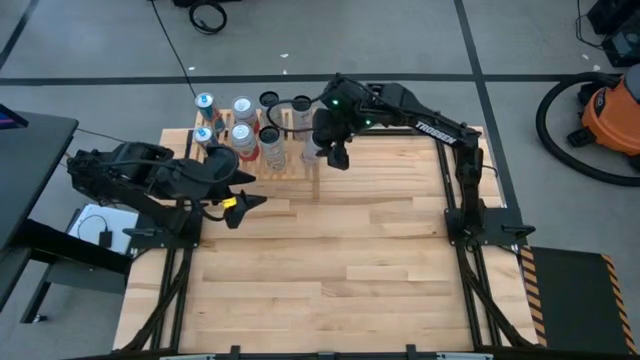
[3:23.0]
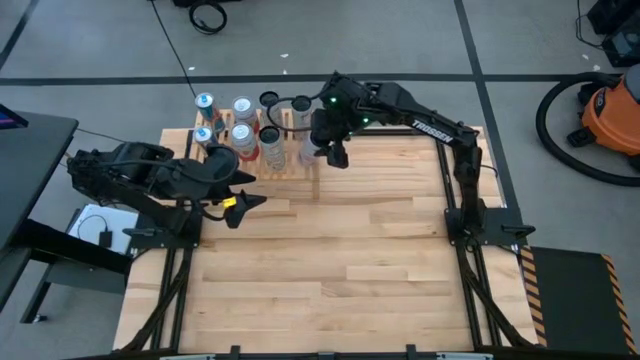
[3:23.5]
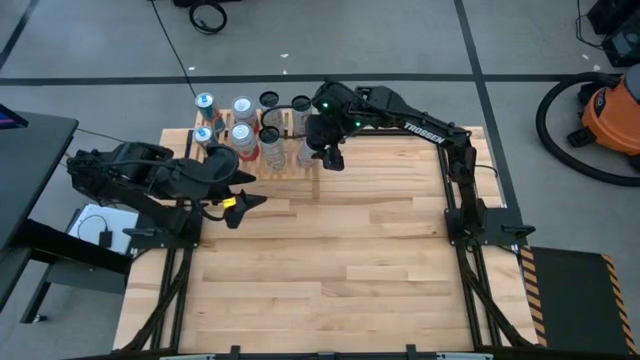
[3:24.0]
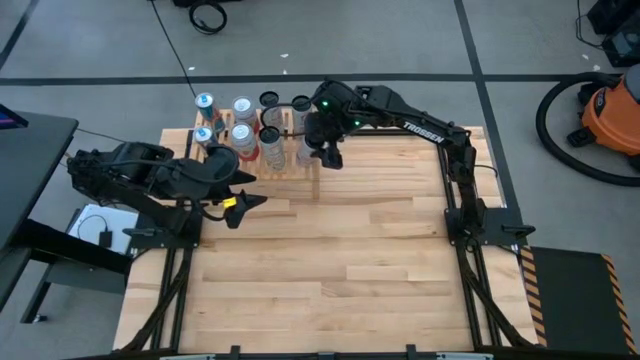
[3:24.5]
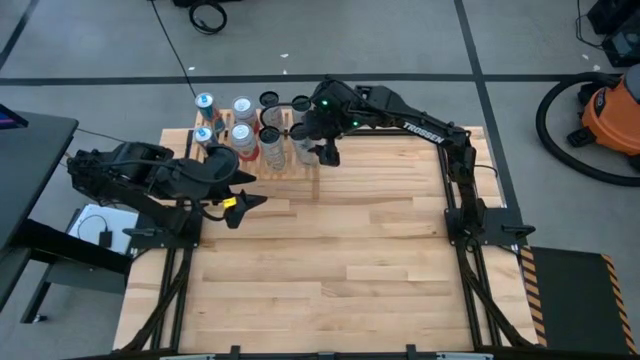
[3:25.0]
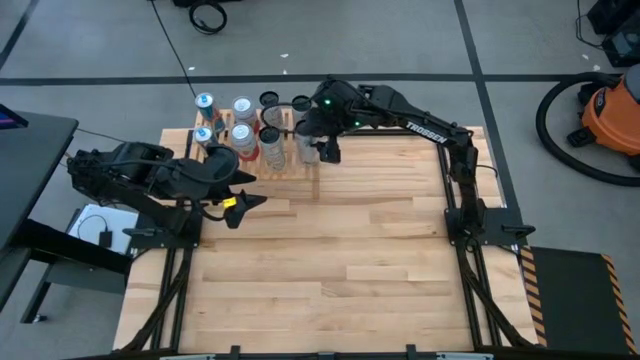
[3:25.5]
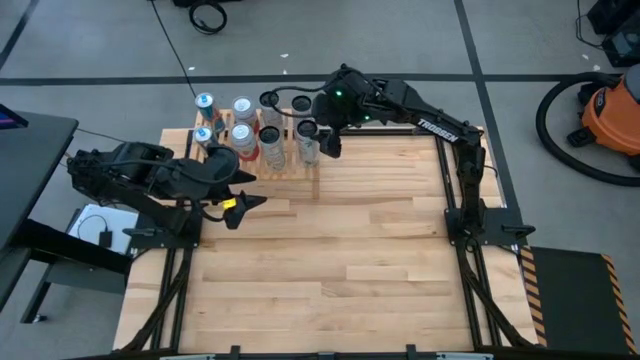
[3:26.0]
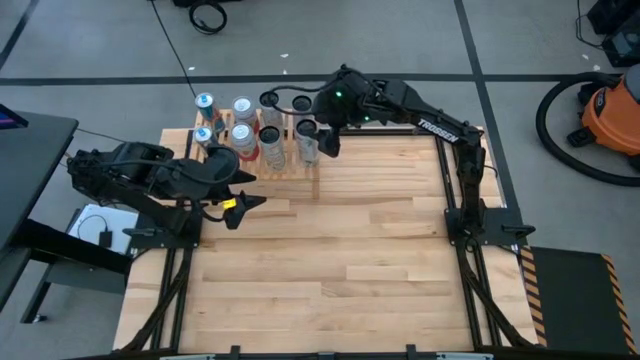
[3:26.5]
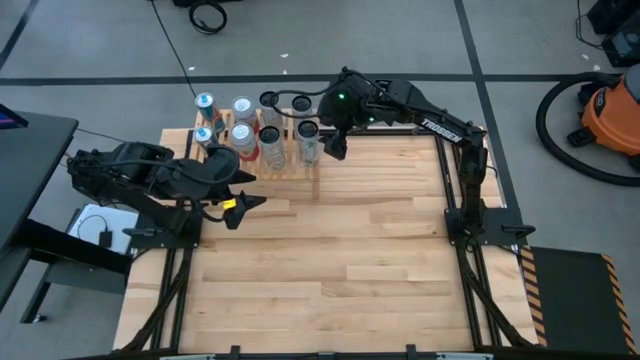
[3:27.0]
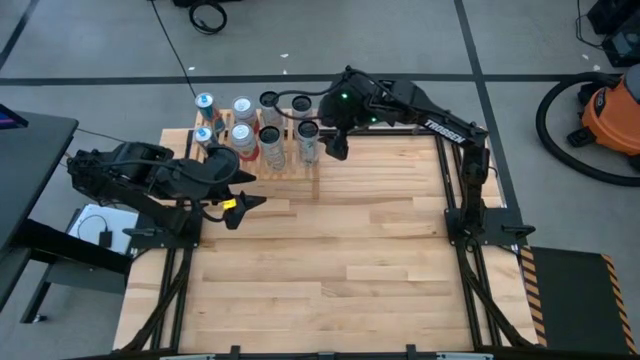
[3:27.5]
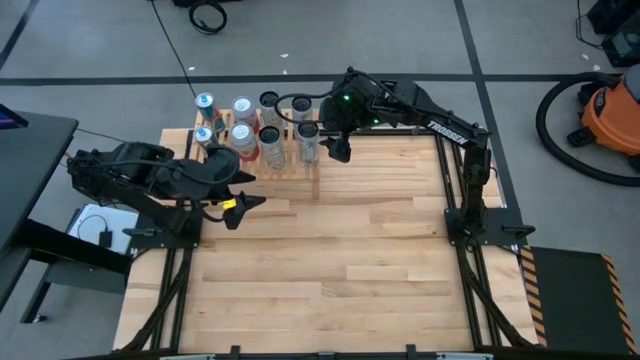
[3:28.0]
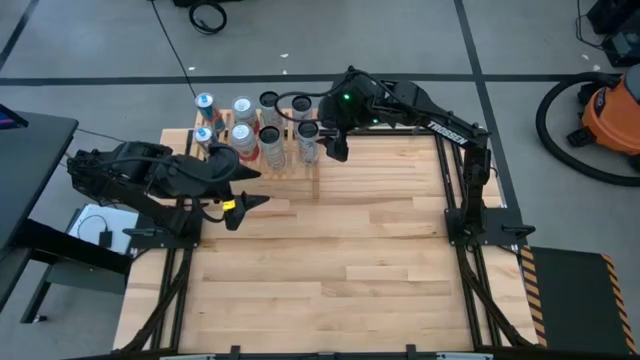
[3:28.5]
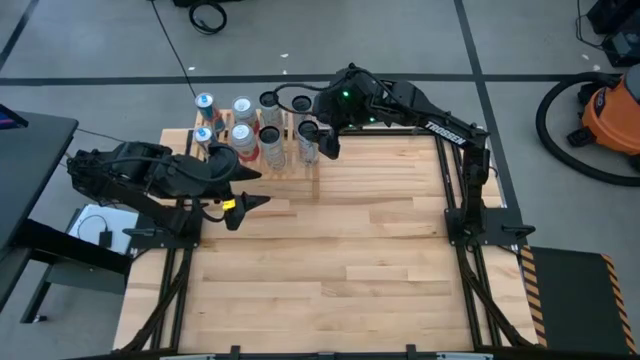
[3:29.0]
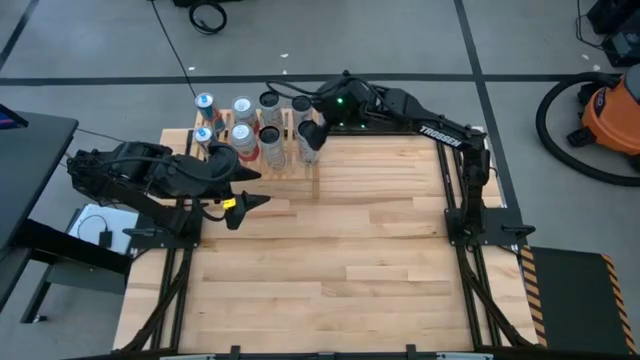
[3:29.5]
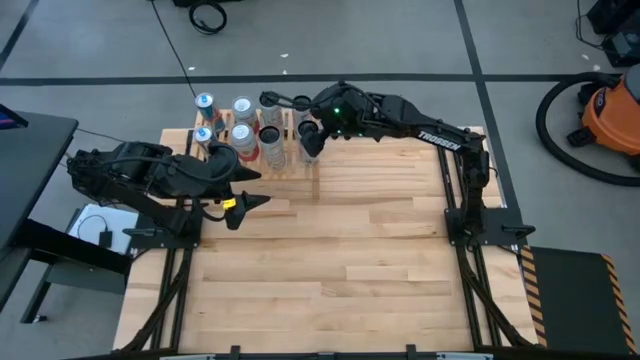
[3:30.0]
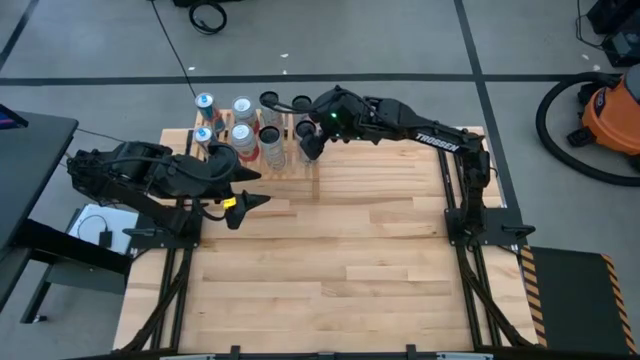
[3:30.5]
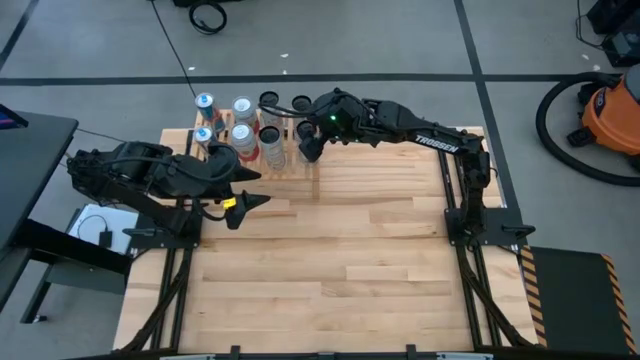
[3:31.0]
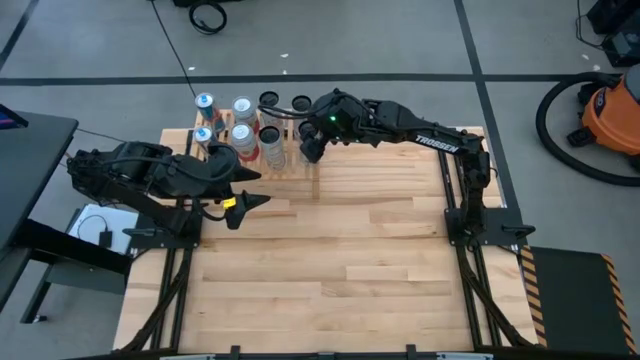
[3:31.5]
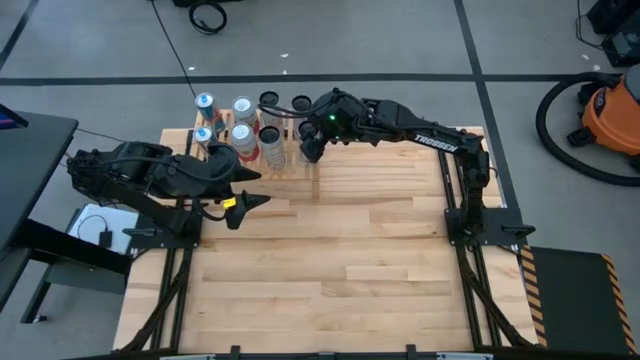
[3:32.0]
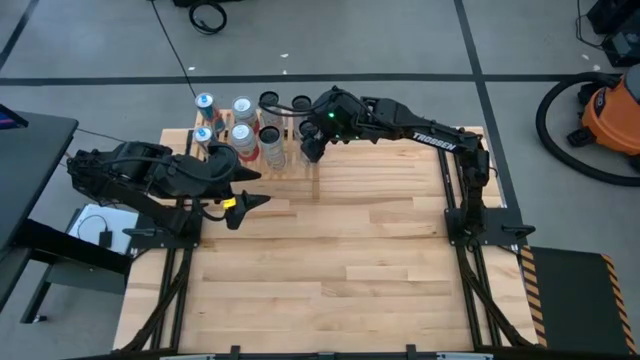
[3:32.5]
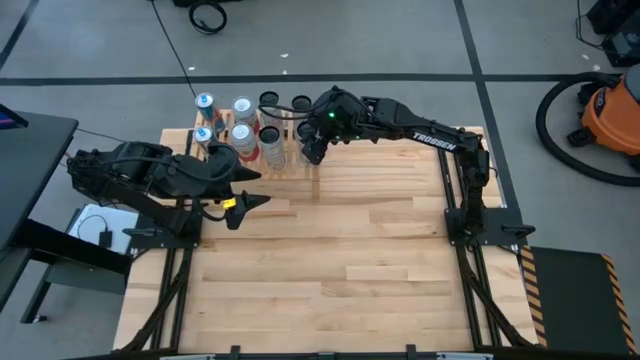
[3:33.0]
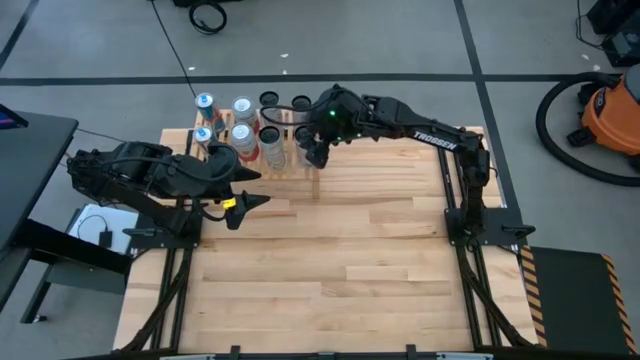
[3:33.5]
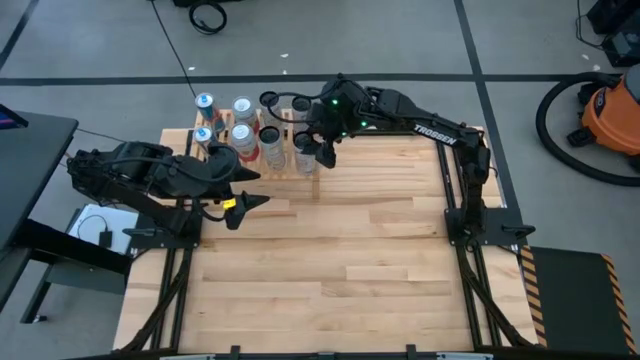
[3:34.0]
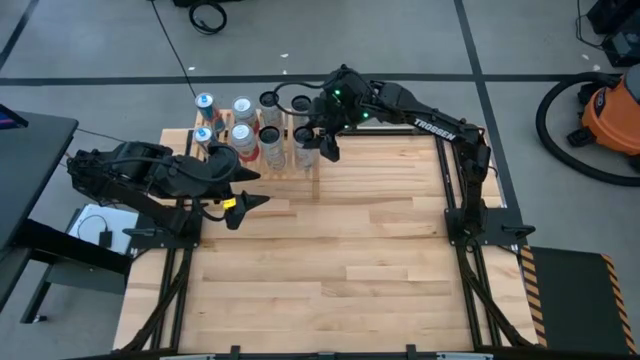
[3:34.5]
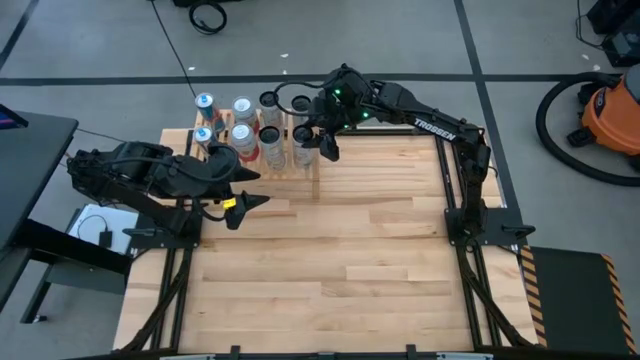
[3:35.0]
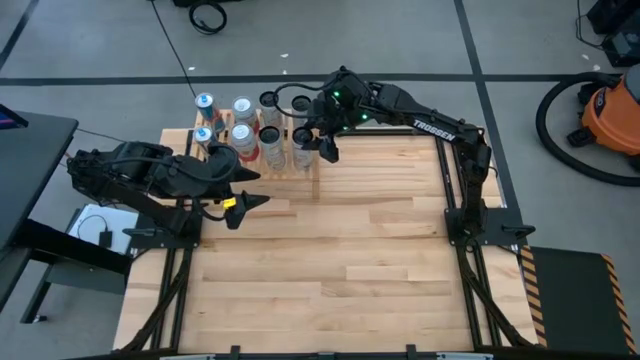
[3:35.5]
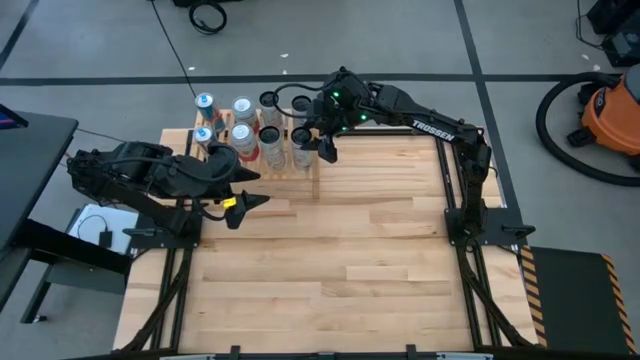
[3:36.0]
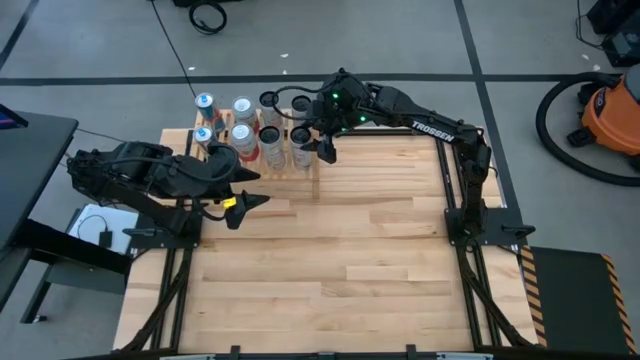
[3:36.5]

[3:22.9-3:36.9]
Task: Place canned beverage on shelf
Put the white and pink soda can on the shelf aligned with the other white and pink soda can on the shelf

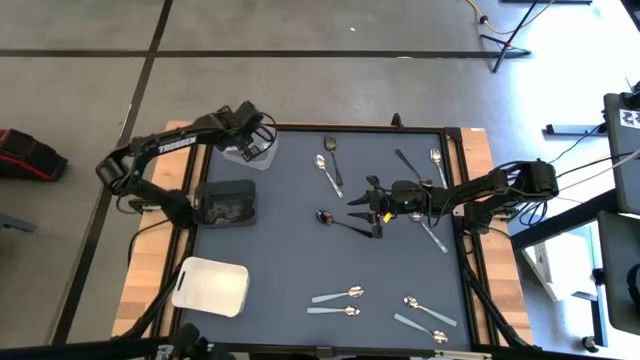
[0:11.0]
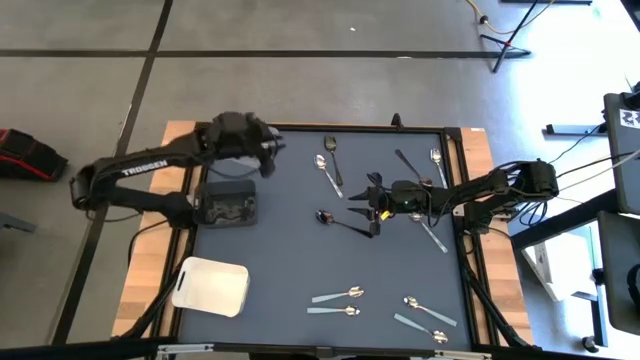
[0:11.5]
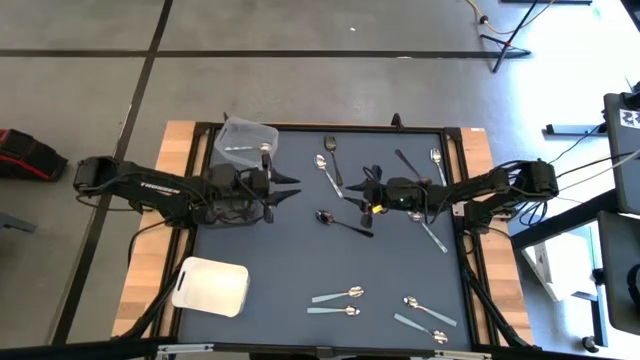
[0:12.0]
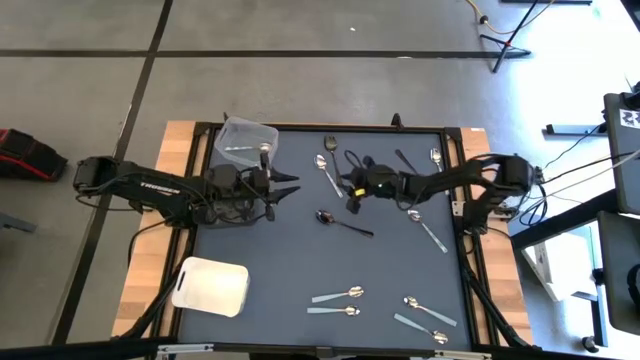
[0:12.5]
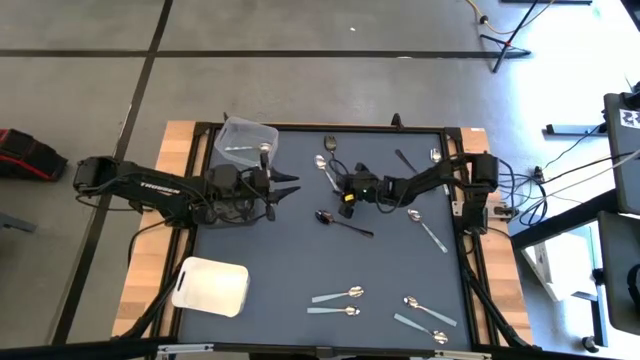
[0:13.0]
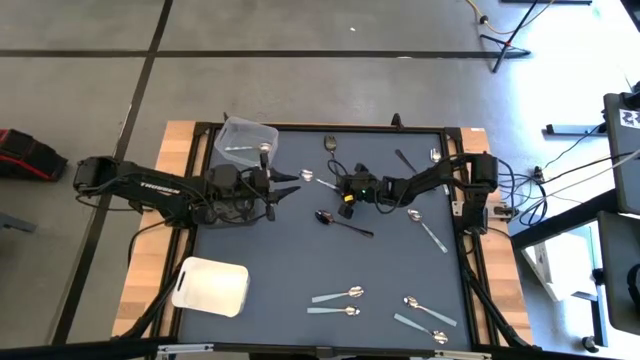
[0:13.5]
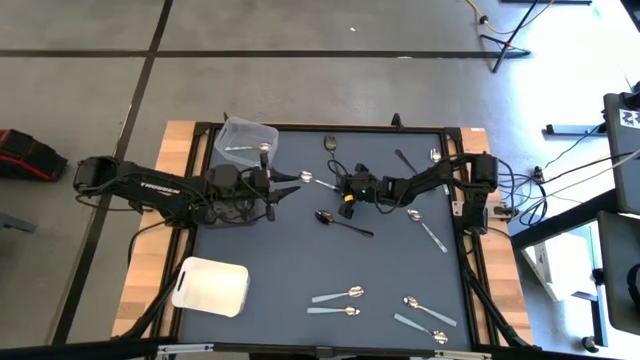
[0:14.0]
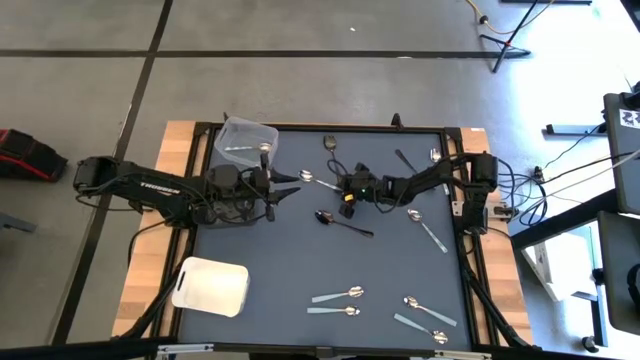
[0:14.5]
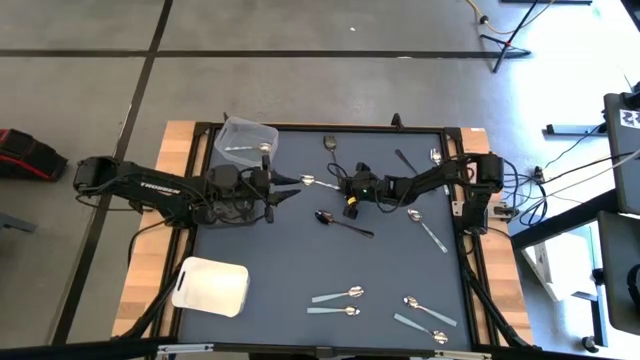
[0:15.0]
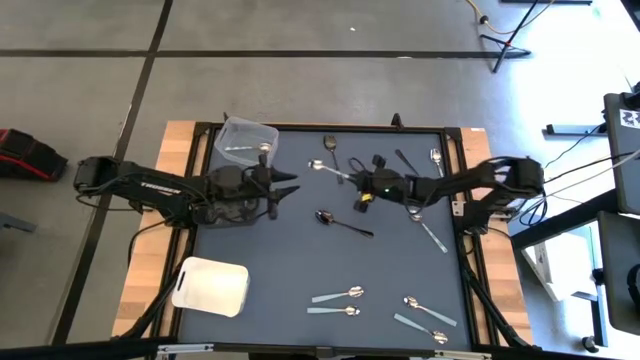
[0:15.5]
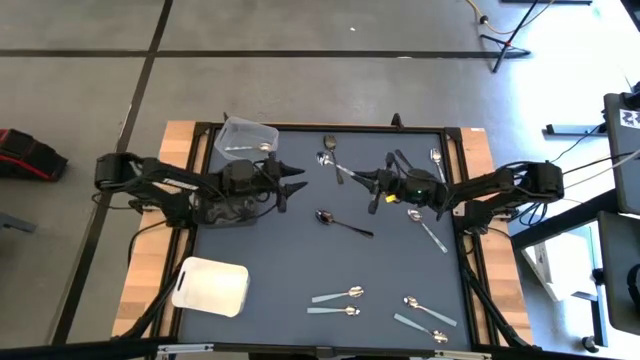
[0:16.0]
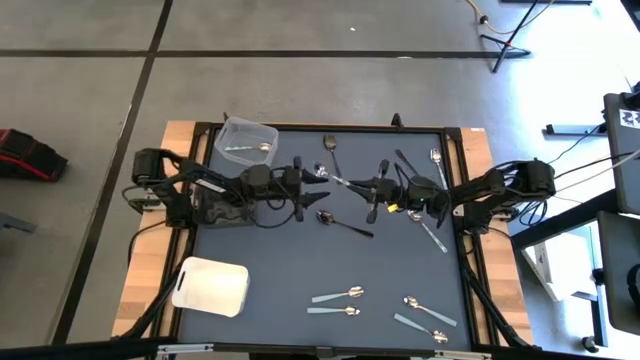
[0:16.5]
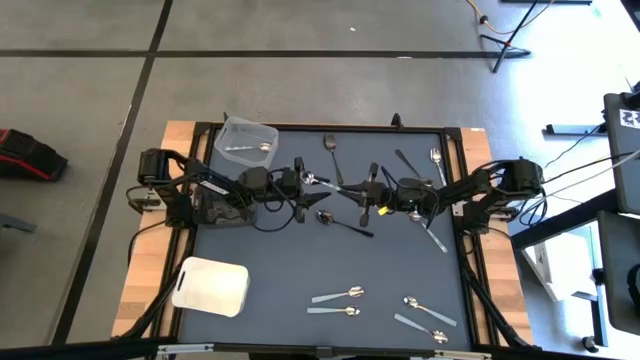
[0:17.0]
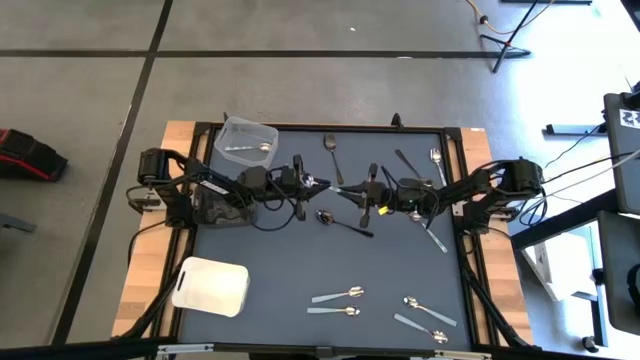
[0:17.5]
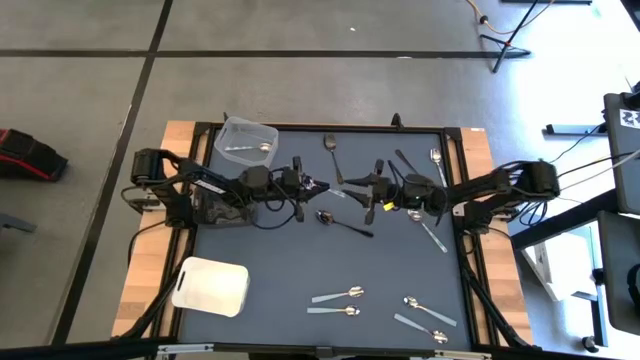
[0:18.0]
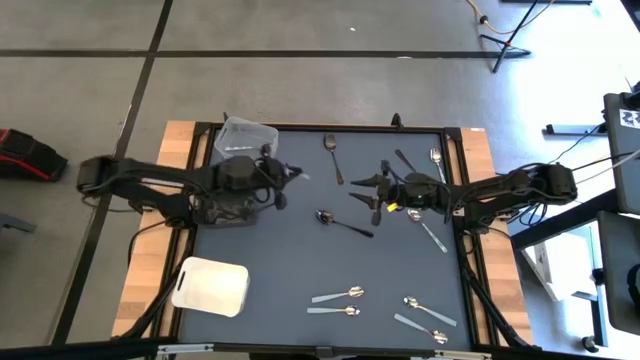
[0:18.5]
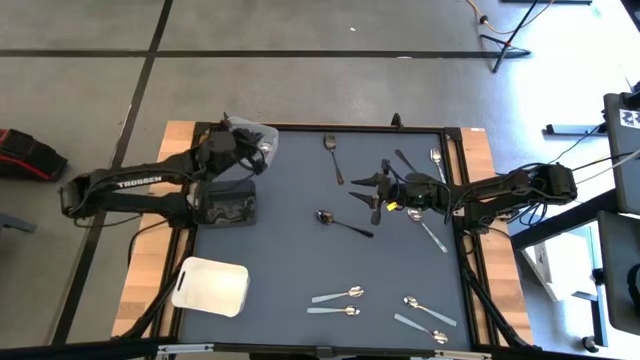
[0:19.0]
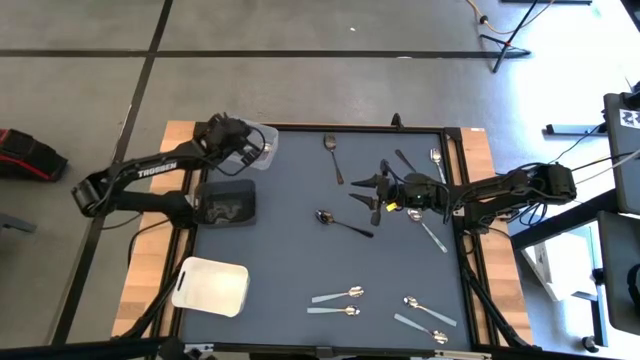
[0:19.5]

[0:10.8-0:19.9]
Task: Sort silverware by color (type)
Put the green spoon into the transparent bin
